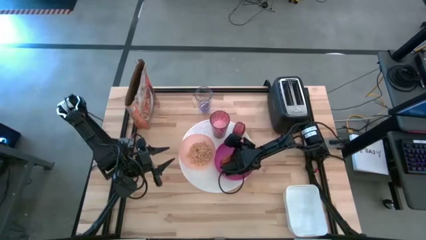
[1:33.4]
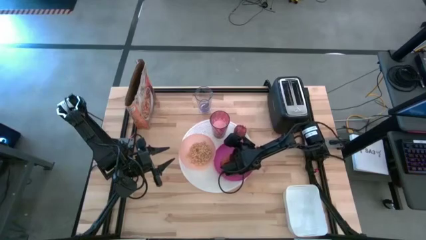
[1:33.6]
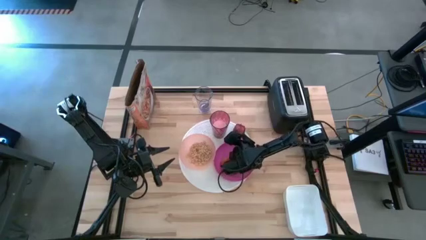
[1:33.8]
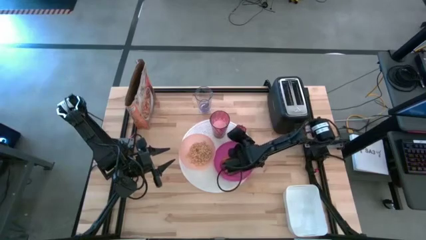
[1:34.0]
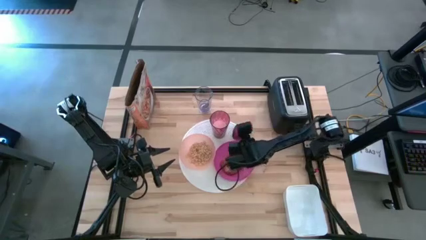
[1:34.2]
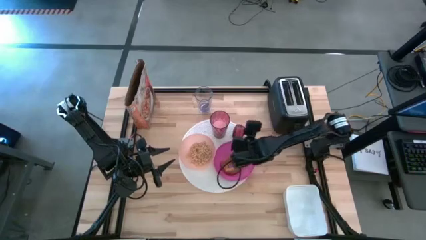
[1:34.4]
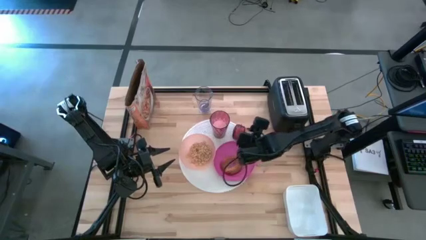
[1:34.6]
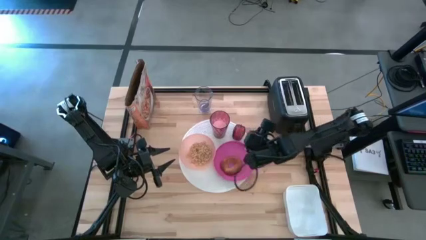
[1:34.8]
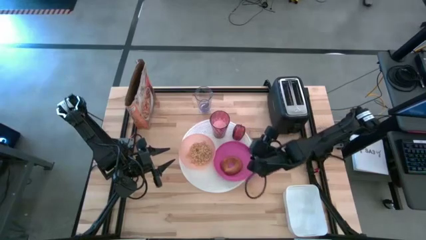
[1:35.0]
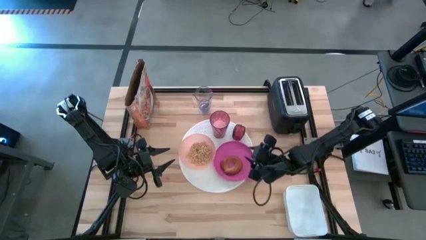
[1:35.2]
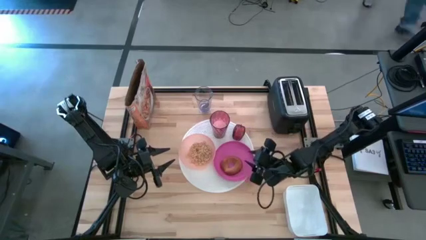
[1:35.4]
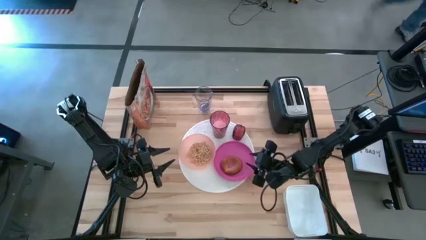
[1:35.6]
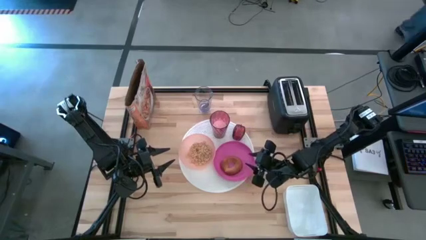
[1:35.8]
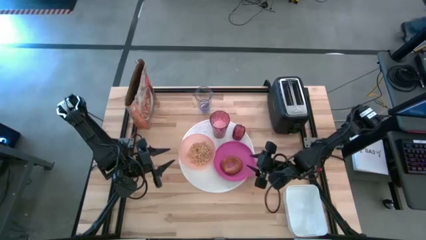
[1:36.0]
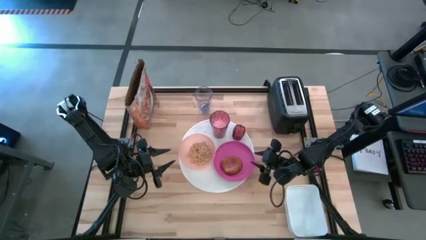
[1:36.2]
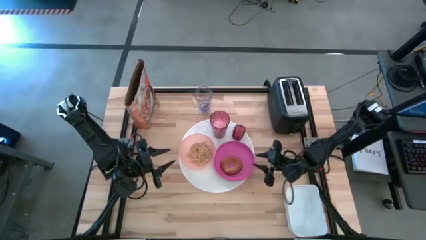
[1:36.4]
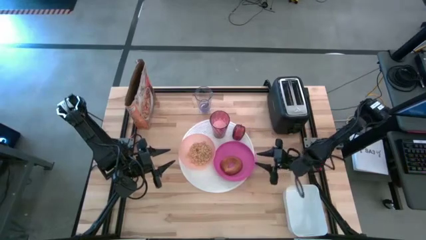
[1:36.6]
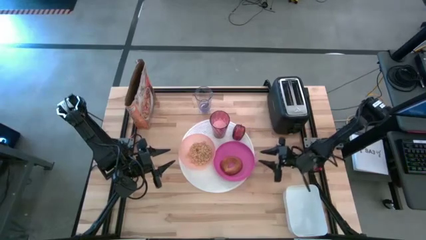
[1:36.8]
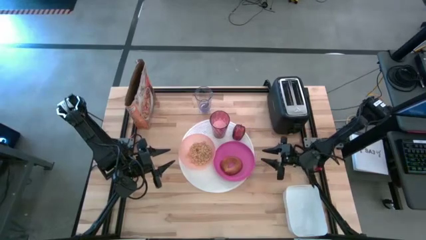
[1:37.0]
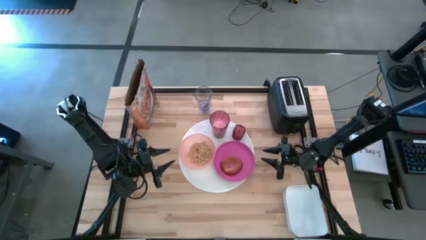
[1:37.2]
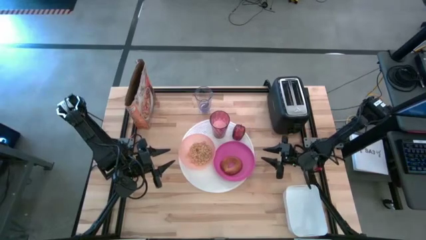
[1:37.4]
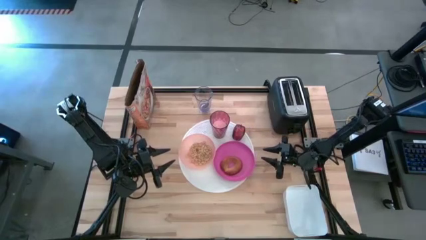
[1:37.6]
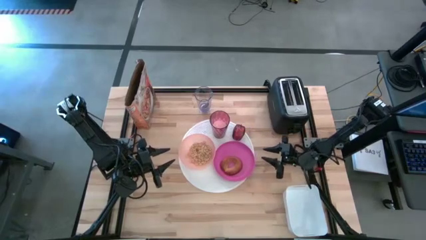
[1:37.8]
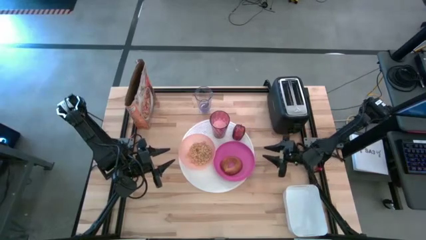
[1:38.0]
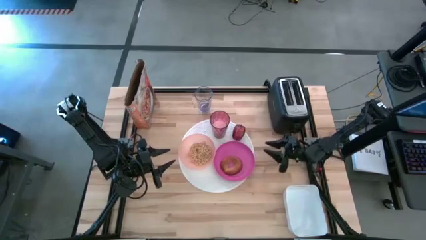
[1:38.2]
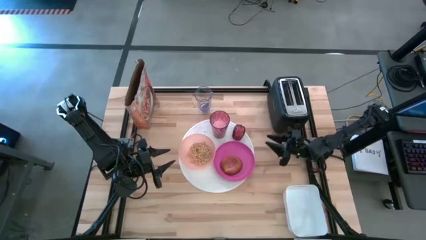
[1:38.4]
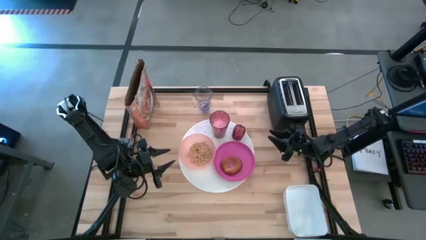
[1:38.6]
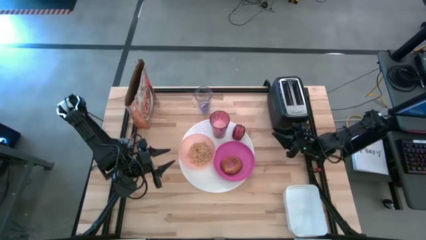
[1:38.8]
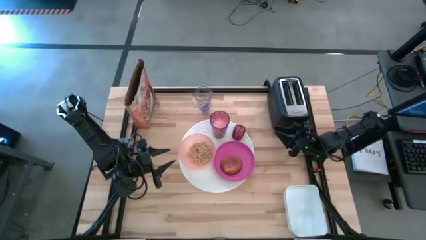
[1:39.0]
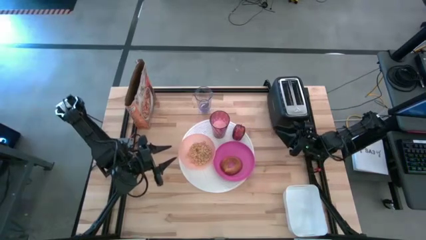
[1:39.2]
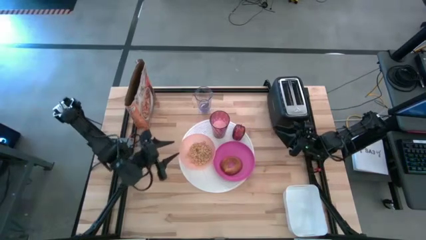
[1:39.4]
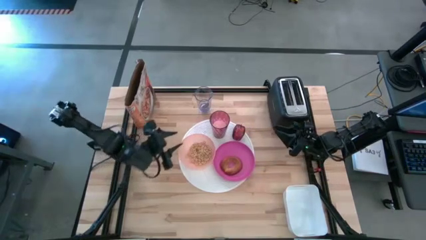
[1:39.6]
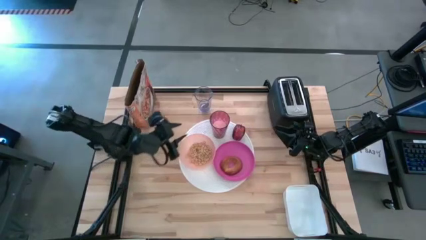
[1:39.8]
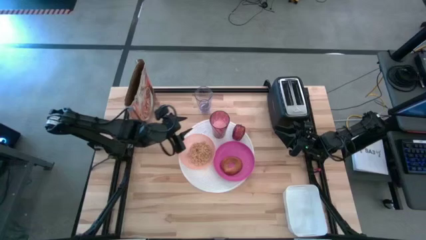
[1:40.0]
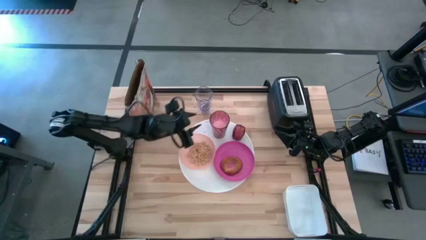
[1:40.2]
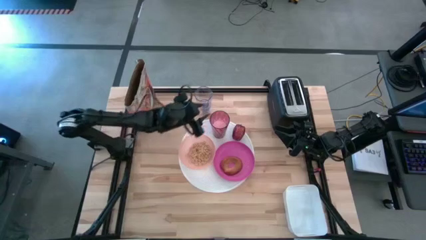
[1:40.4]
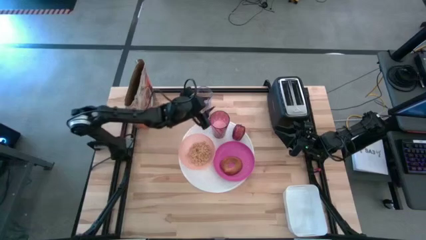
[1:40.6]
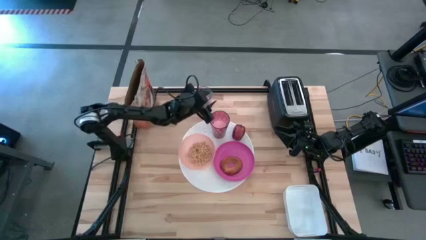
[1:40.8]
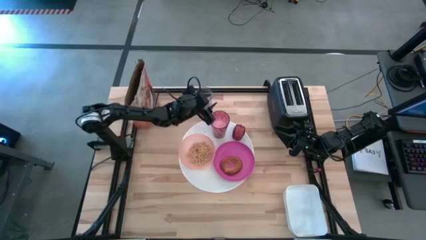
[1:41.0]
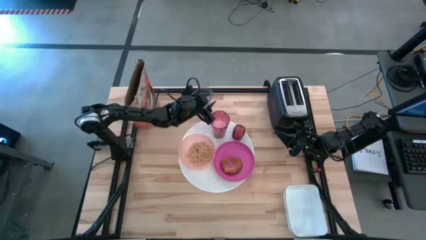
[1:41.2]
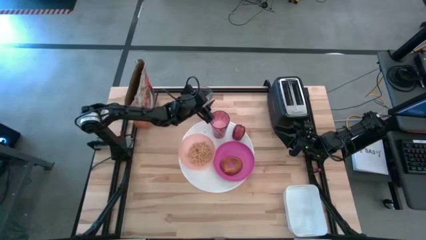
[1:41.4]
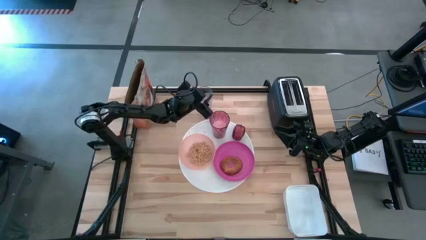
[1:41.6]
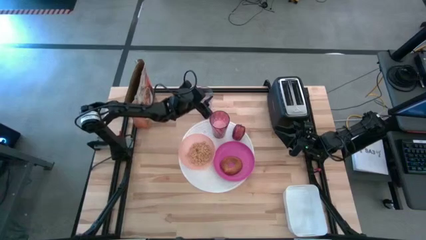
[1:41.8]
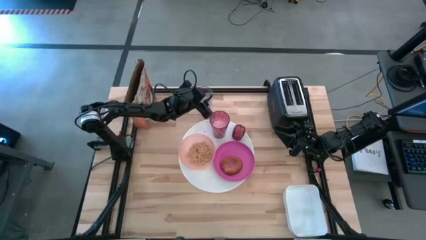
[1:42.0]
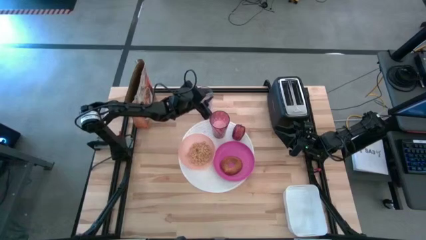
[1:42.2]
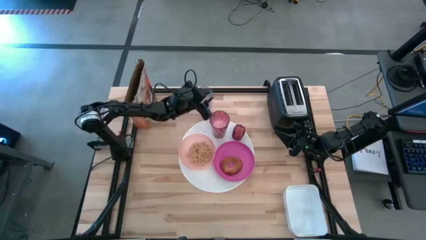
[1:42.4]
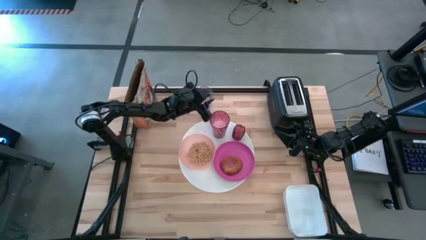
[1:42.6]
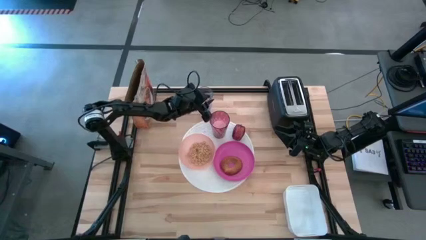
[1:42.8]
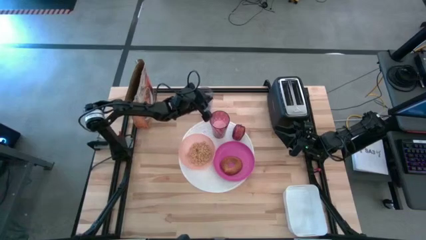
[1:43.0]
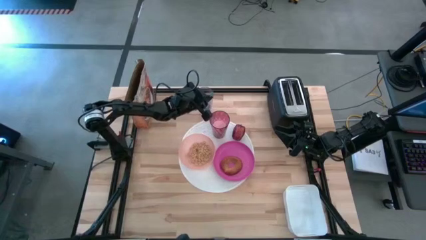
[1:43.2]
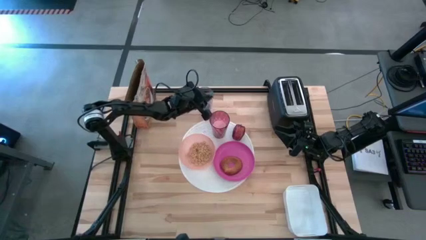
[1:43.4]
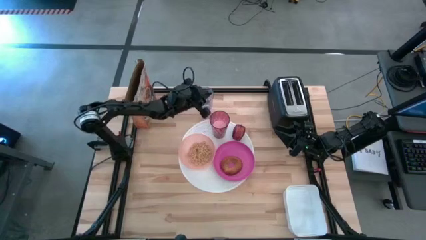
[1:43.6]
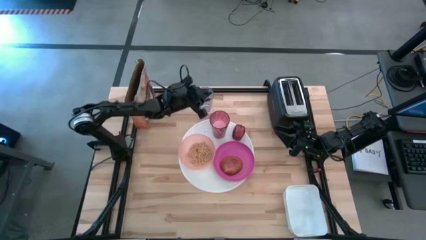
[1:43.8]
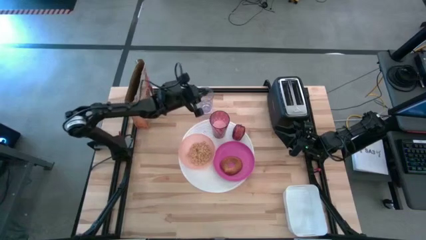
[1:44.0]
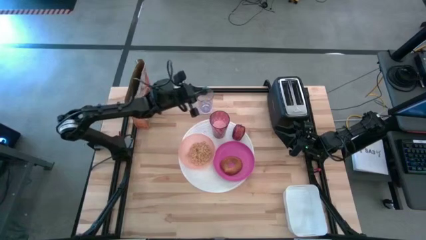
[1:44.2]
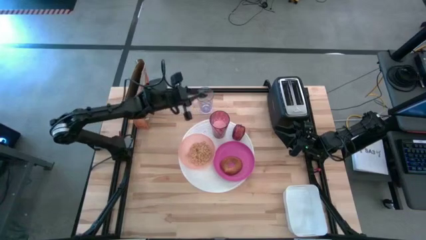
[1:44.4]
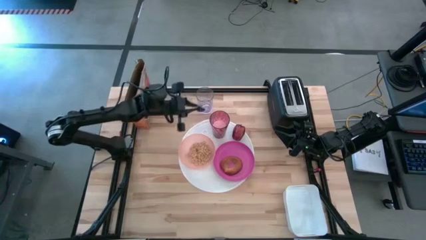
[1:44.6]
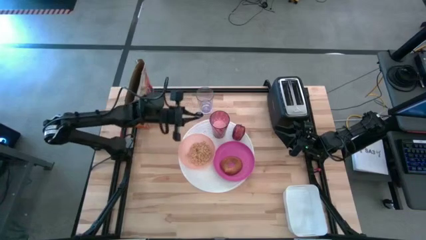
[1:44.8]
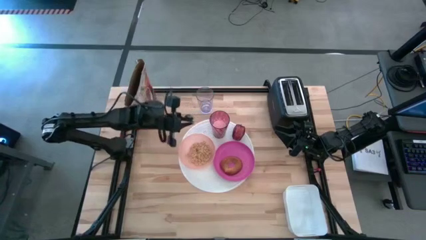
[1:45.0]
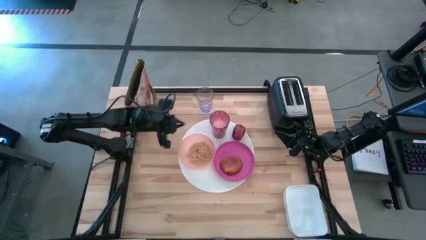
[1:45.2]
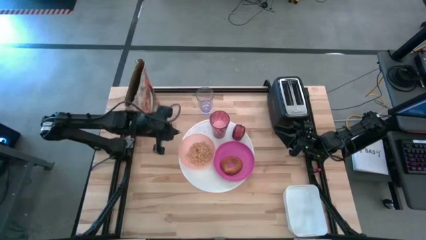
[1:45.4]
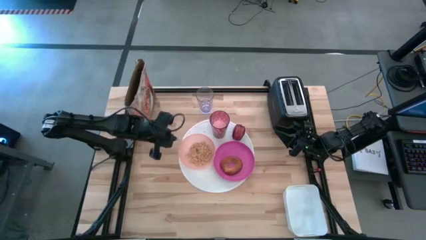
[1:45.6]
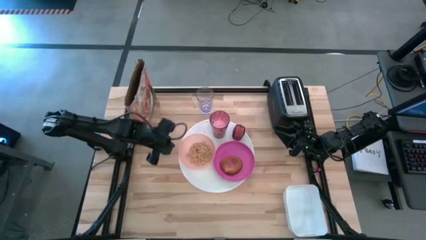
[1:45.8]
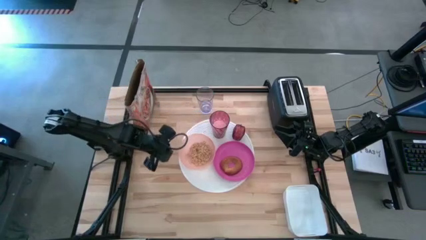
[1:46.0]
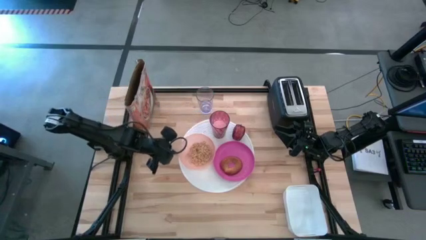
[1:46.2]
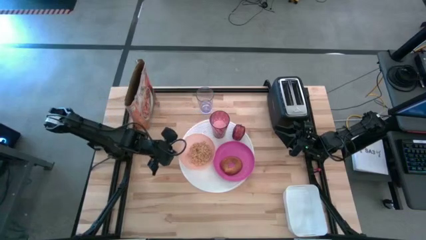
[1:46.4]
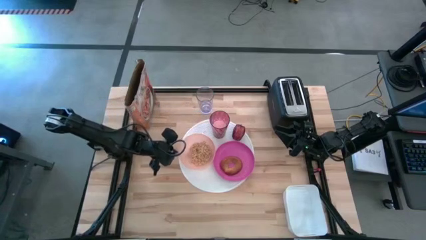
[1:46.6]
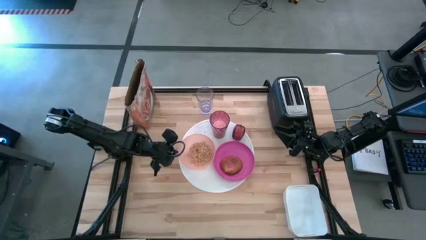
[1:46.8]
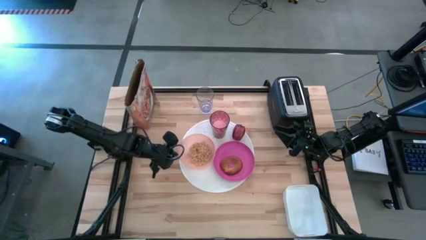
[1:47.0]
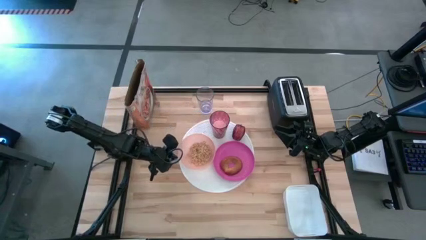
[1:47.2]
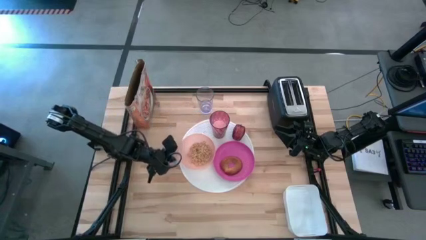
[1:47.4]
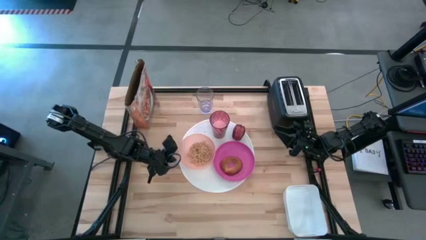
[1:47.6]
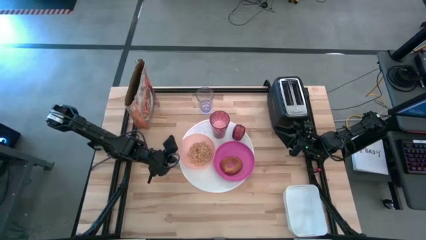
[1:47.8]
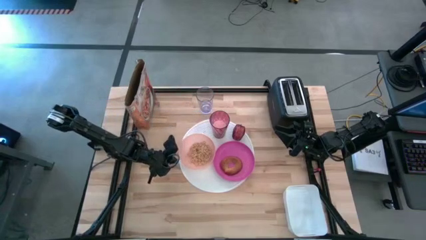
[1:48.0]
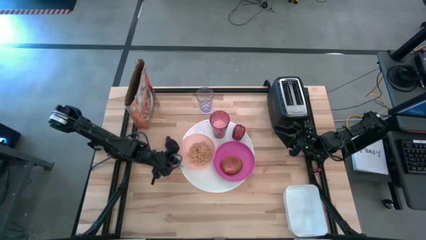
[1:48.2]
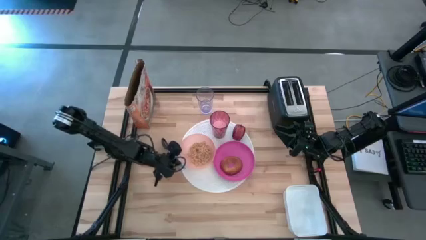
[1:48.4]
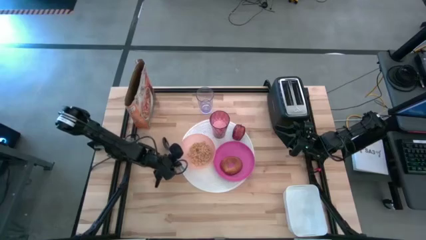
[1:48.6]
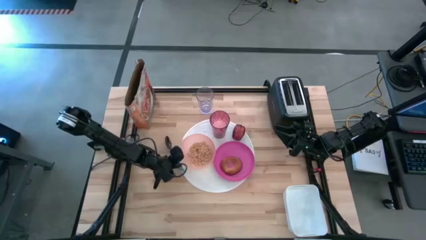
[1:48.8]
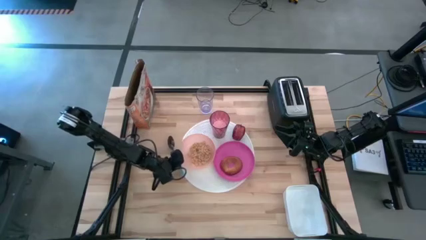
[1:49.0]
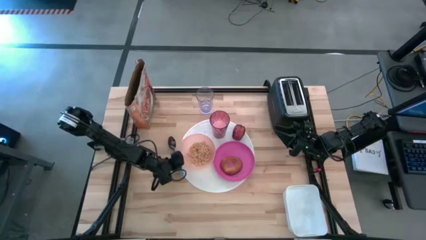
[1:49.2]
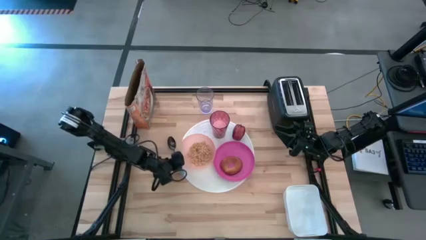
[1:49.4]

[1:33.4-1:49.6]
Task: Arrange a breakfast setting
Put the blue spoon on the white table mat to the left of the orange bowl
